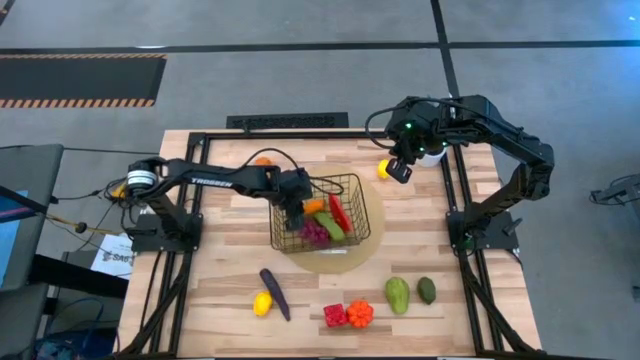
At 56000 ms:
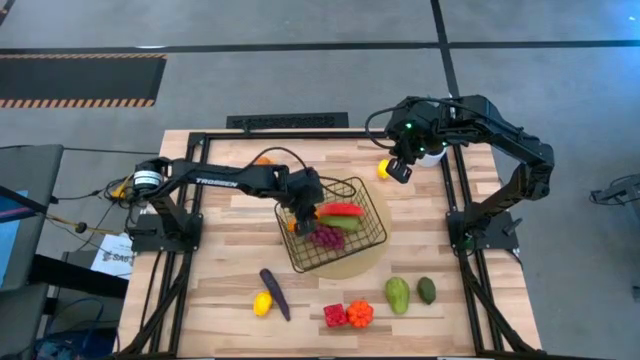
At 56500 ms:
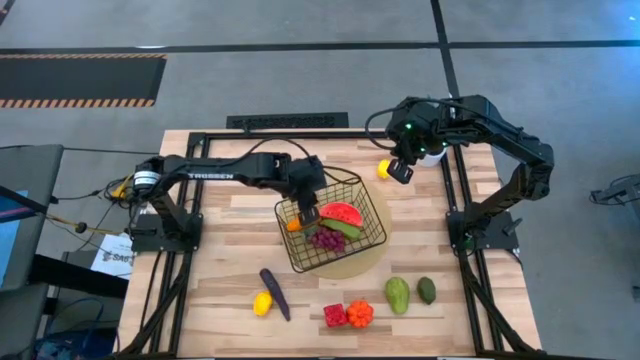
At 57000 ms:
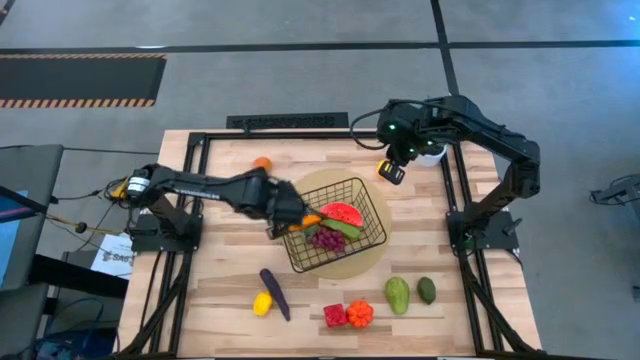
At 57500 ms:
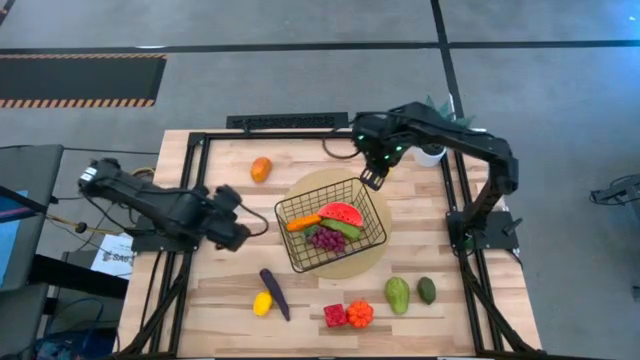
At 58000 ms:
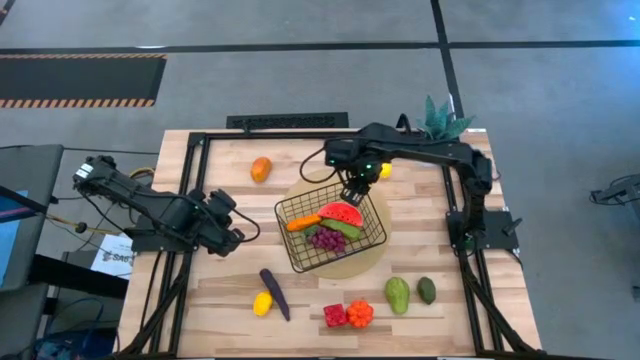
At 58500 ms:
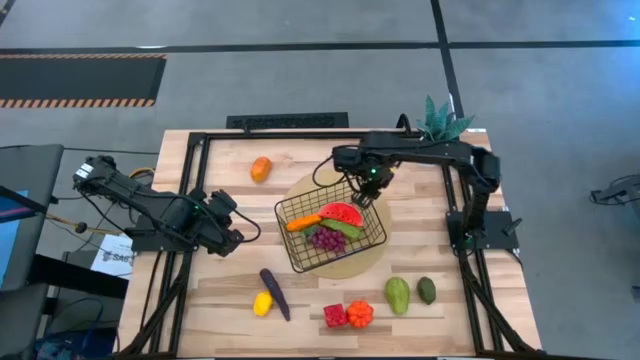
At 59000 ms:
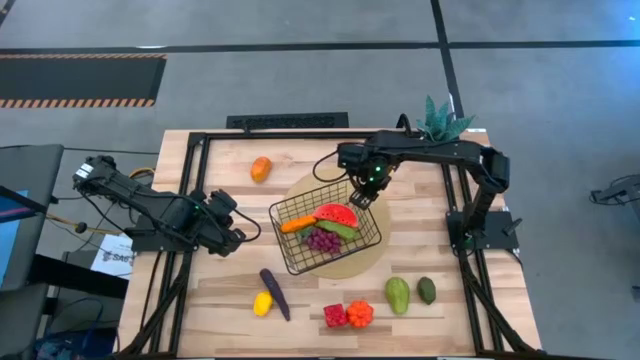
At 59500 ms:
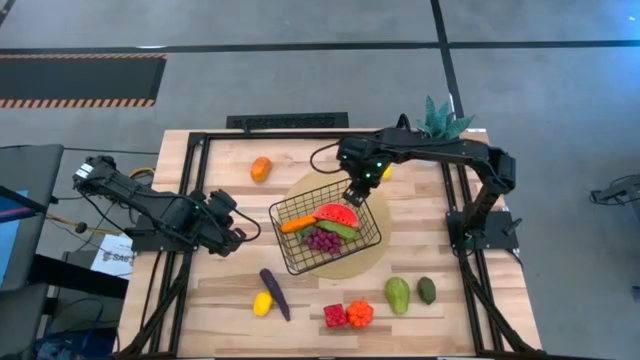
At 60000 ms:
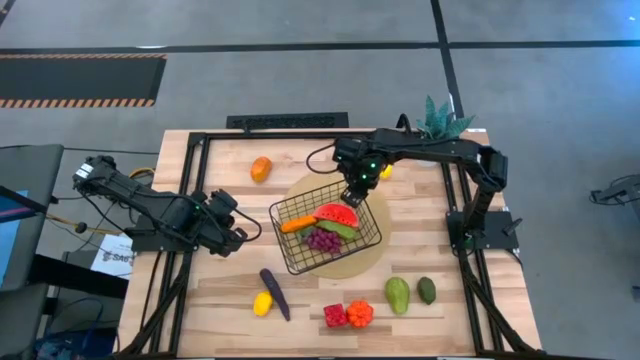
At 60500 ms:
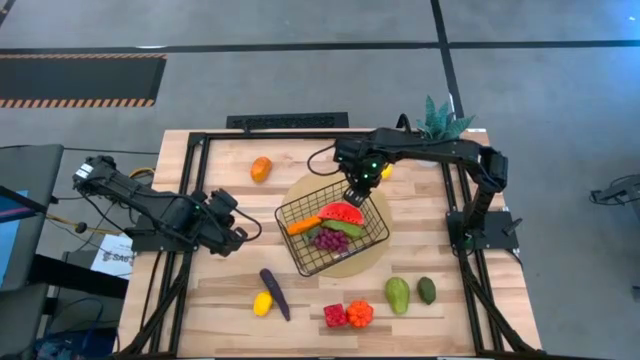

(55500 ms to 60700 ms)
Task: Build produce basket
Adjust the wire basket on the brown table mat

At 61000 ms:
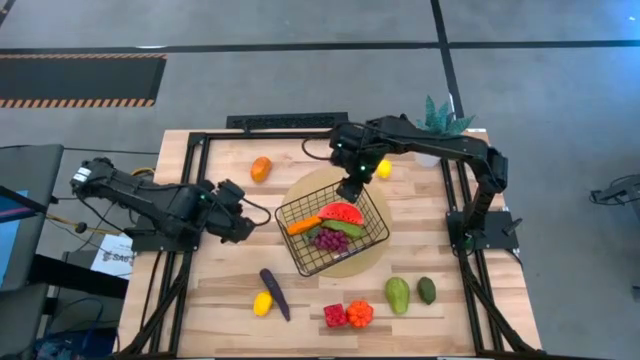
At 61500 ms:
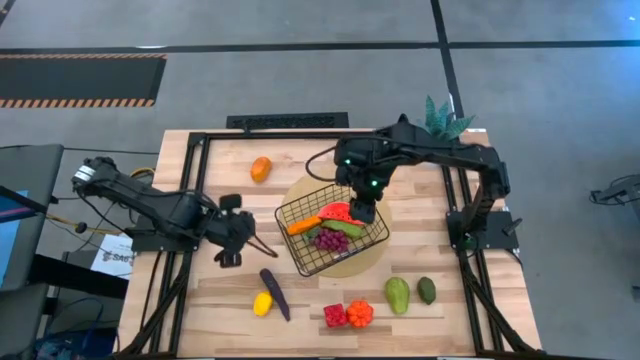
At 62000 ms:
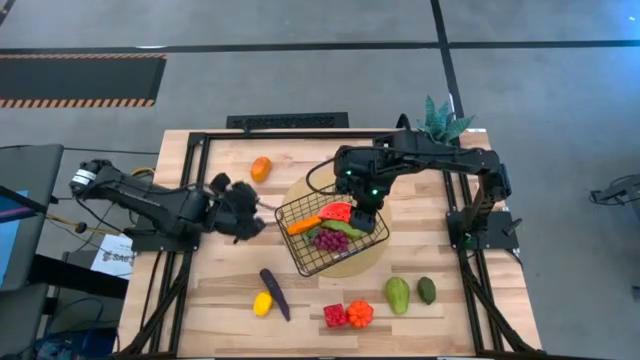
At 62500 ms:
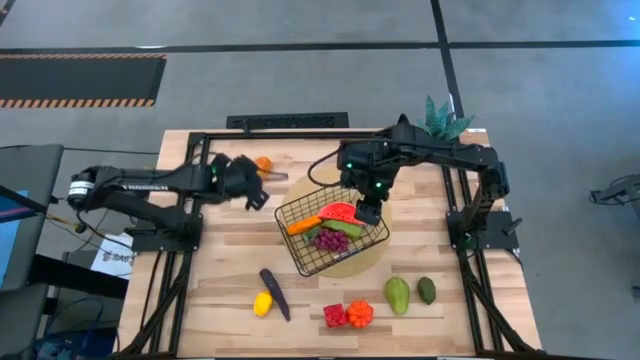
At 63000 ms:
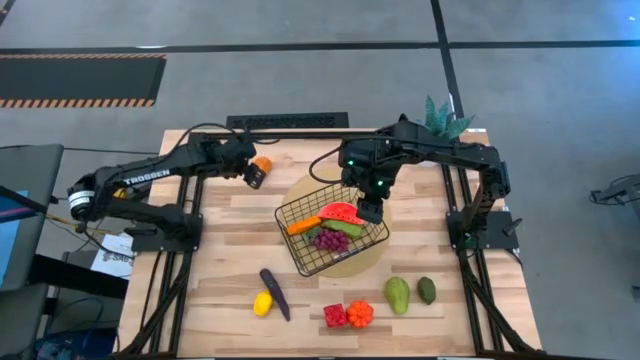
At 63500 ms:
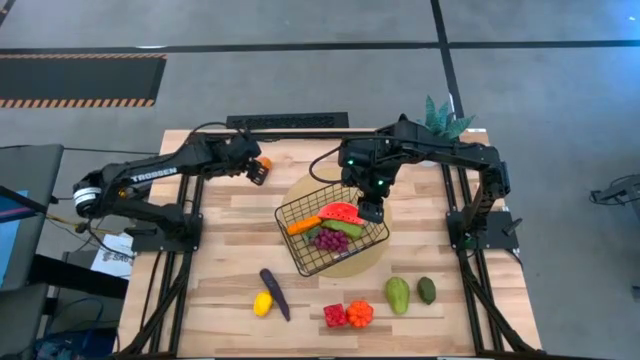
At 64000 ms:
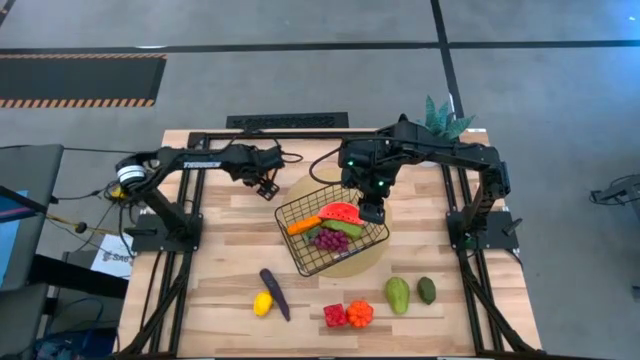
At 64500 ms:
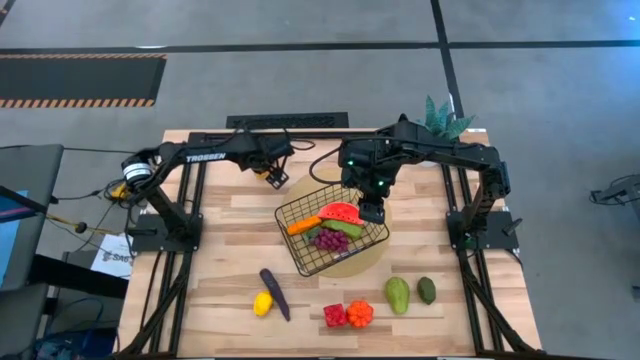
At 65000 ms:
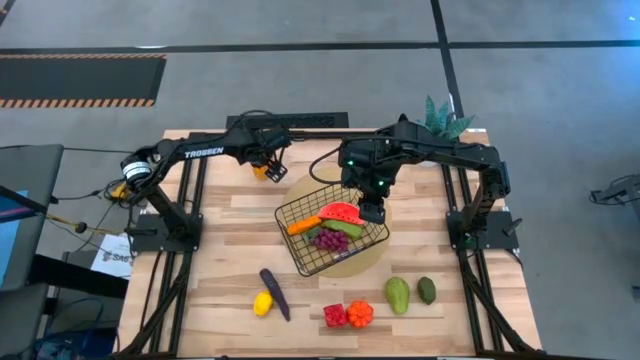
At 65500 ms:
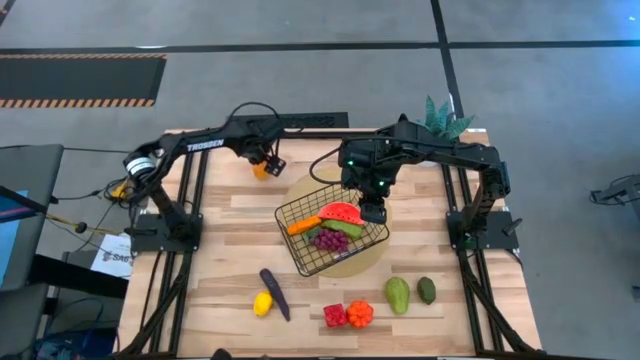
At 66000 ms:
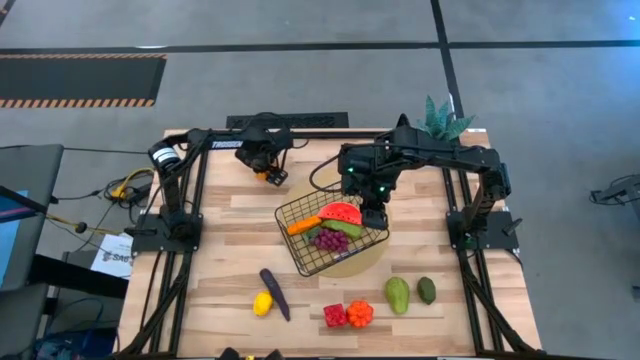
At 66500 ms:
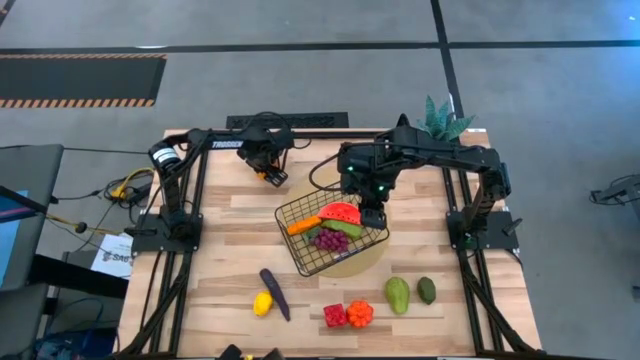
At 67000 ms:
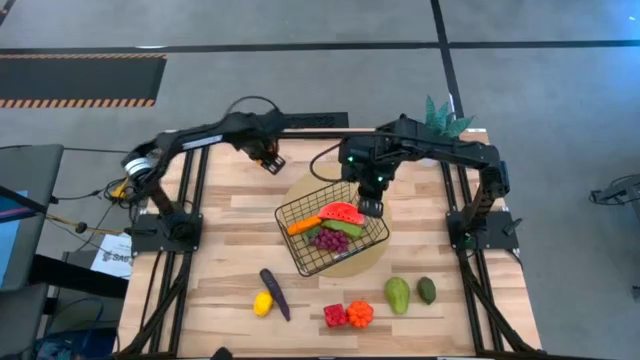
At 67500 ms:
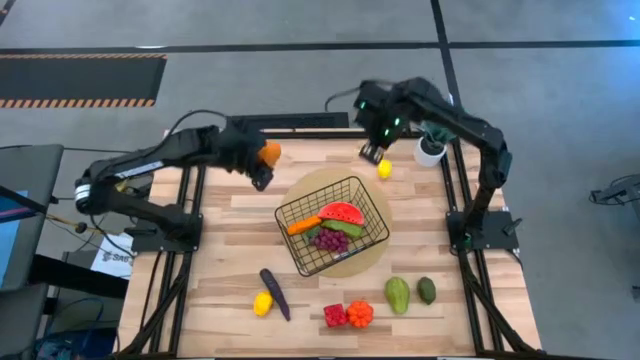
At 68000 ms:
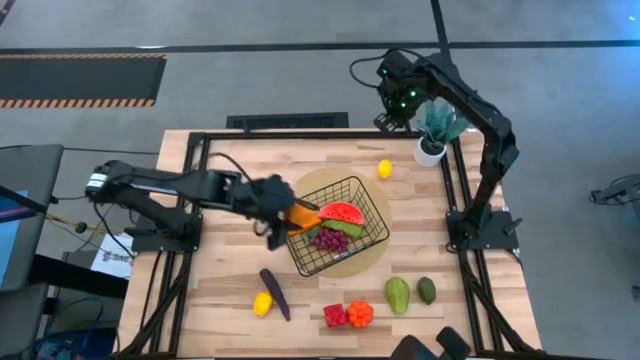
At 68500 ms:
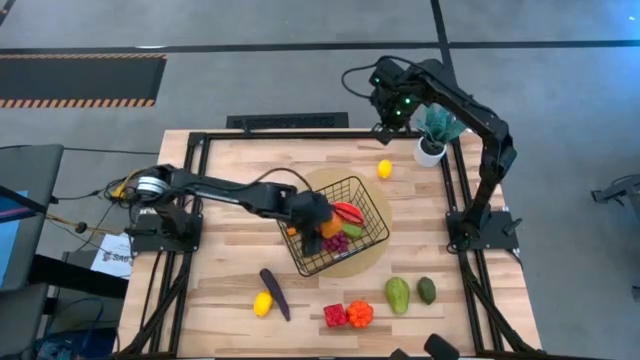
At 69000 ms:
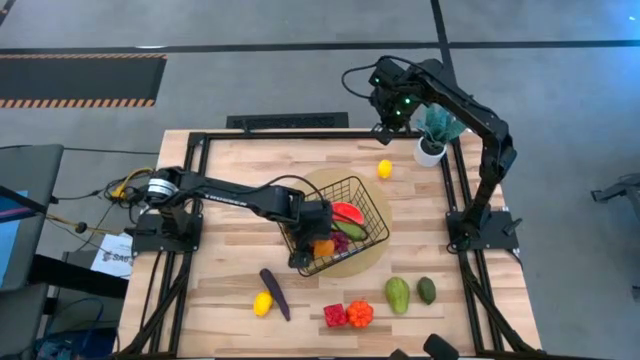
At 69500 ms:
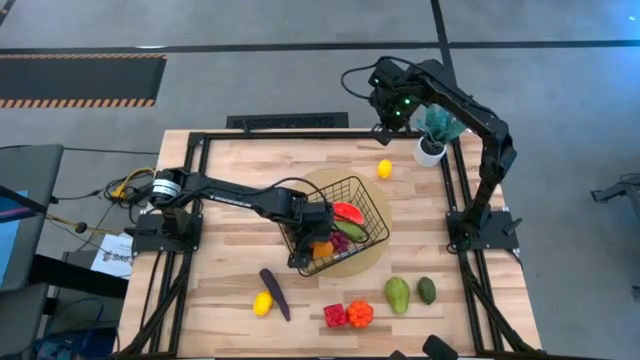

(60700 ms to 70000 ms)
Put the brown potato into the wire basket

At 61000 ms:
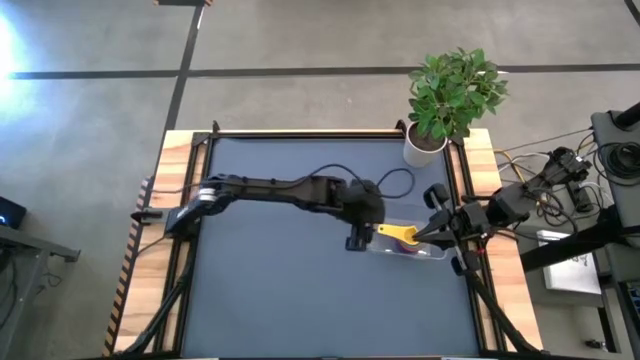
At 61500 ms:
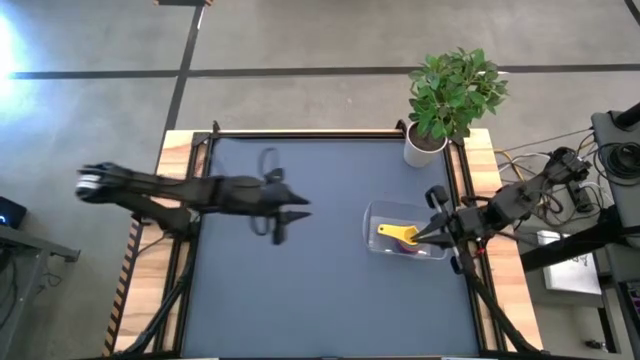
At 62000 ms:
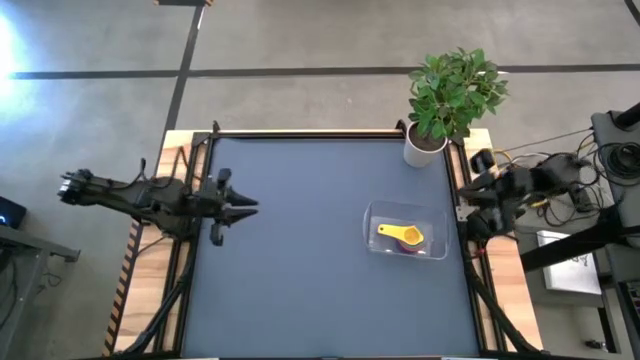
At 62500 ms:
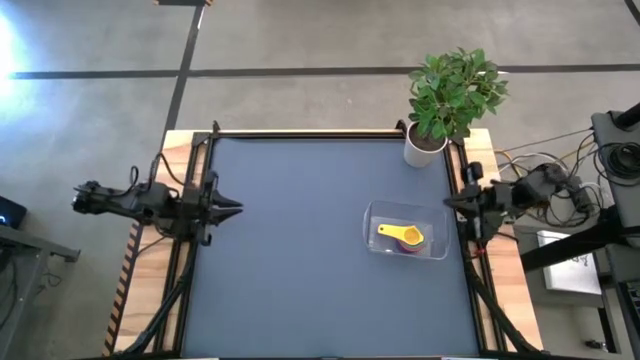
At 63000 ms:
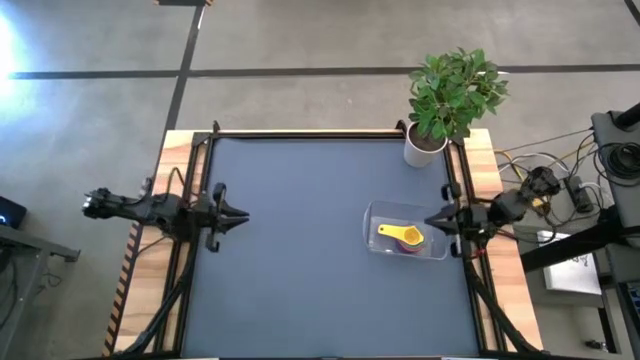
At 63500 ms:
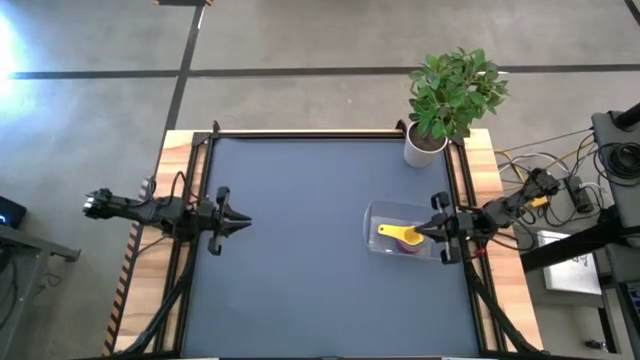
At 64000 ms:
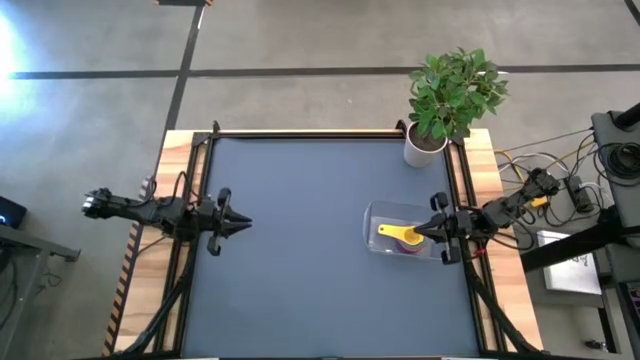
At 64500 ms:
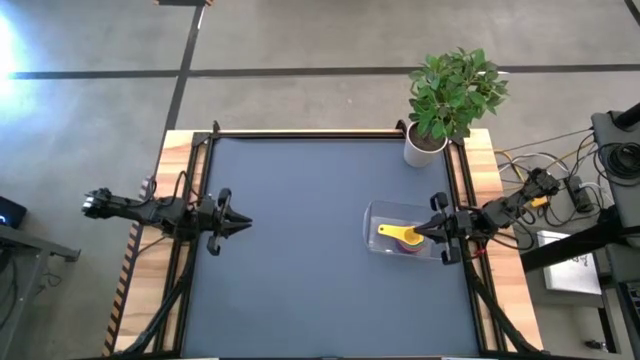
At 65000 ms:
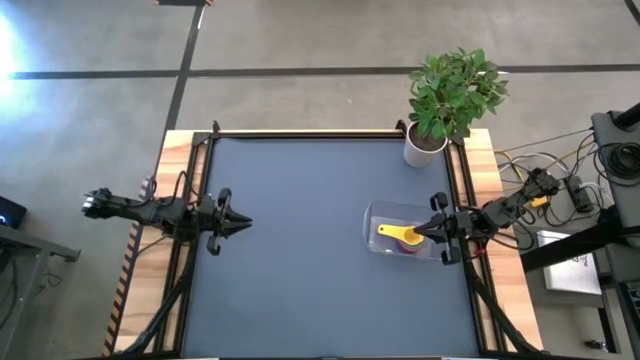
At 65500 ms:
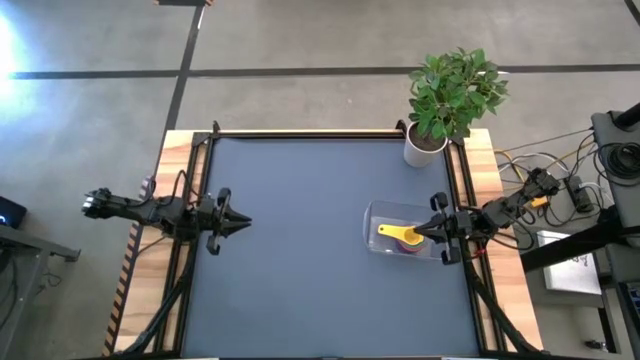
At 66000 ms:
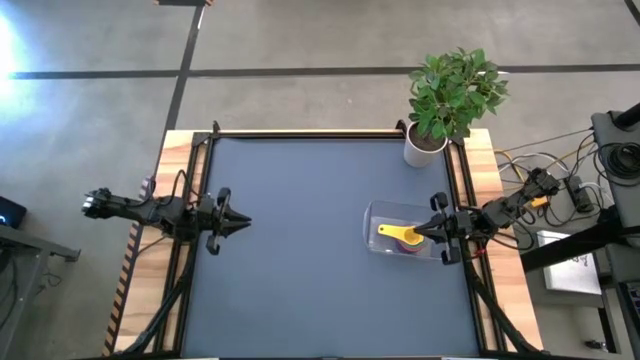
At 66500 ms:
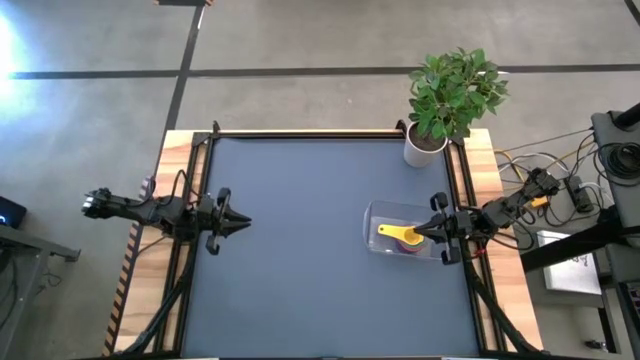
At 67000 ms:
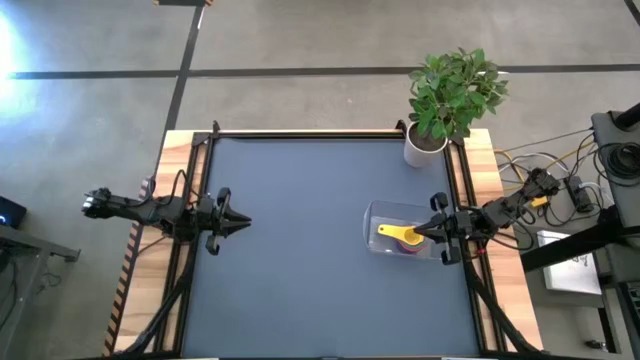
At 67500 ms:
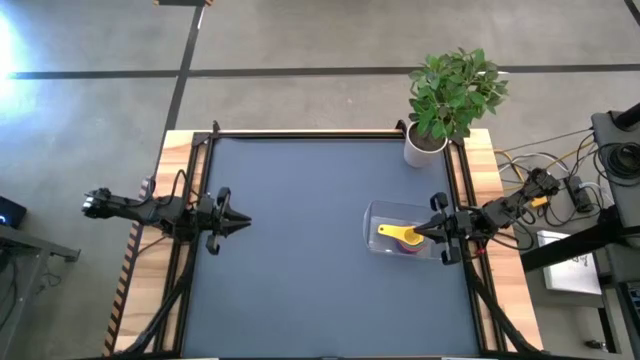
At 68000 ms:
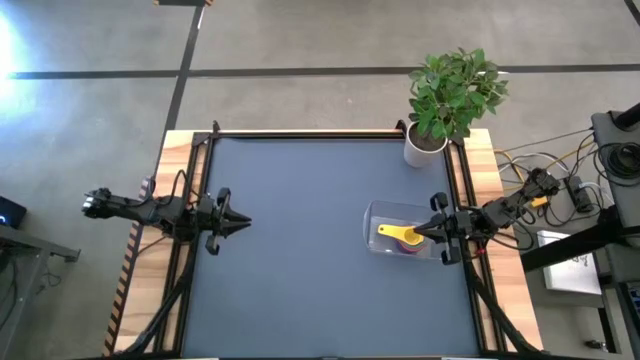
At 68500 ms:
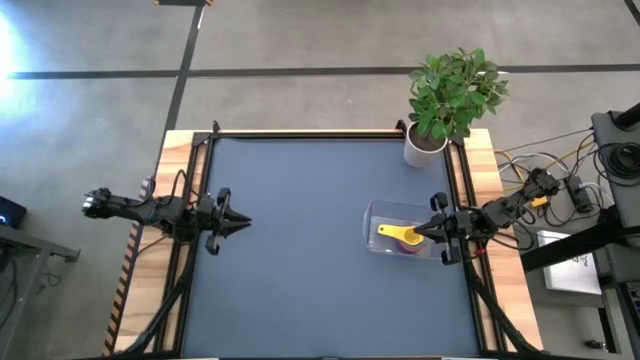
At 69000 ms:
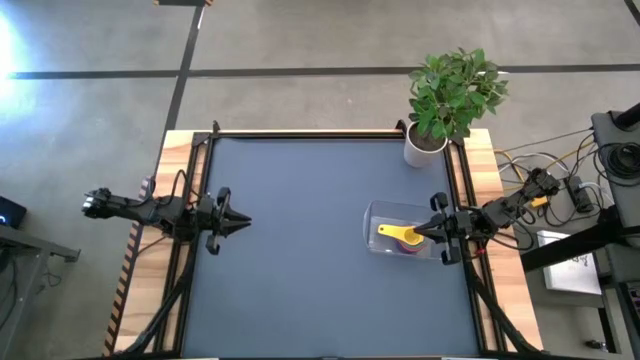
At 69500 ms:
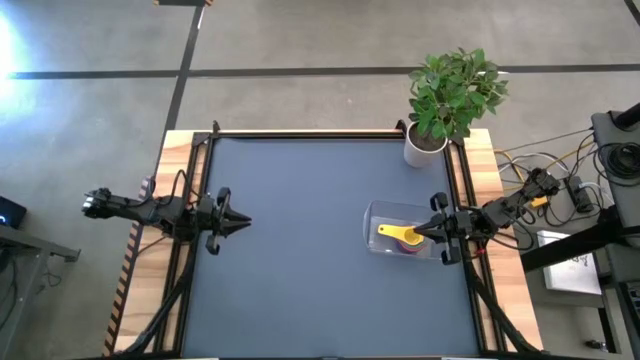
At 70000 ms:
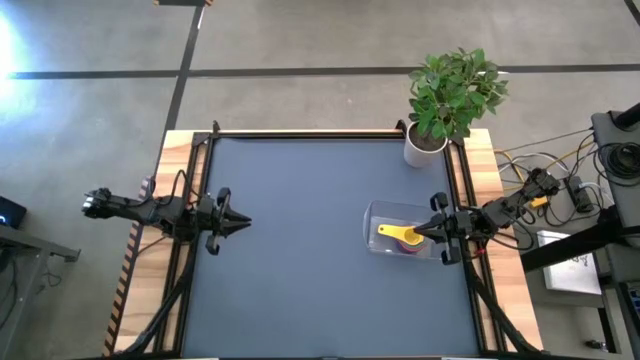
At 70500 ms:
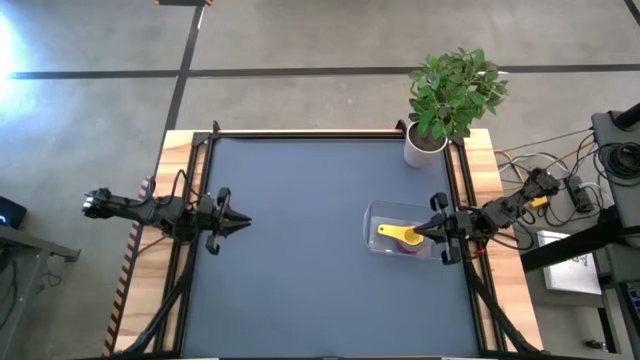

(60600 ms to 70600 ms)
Task: Nest measuring cups in basket
Return to Home Position
